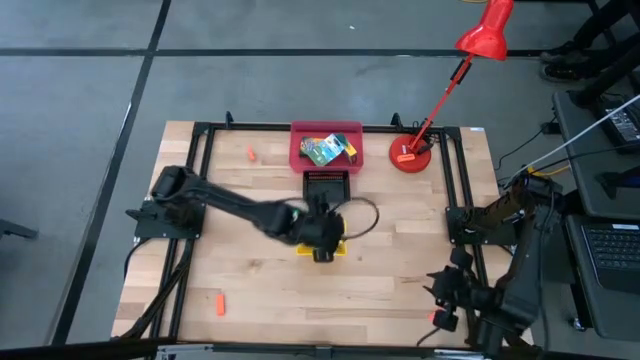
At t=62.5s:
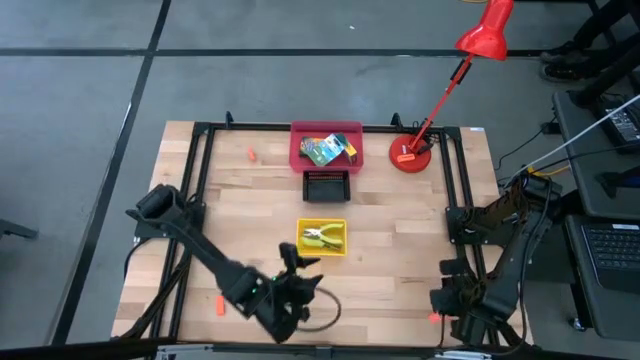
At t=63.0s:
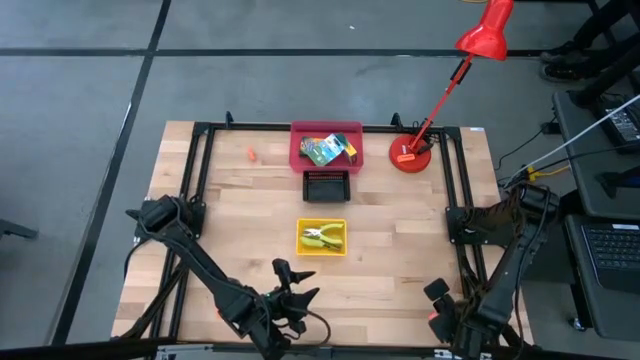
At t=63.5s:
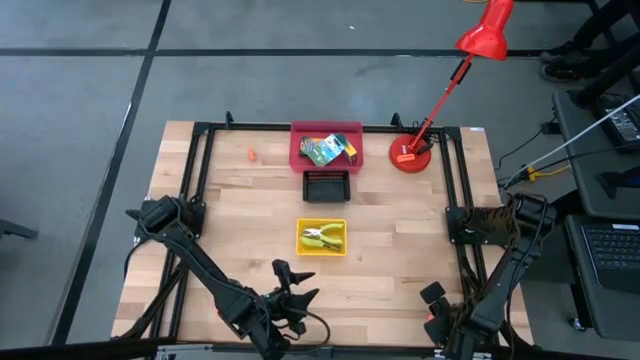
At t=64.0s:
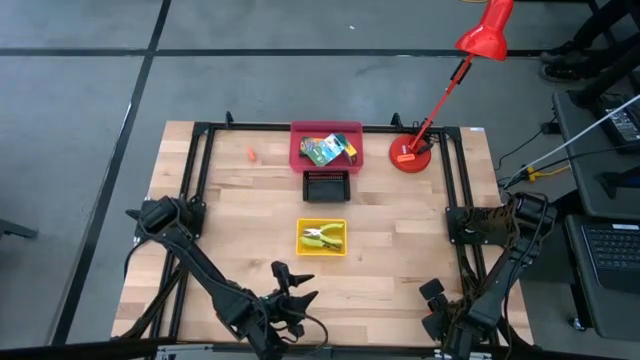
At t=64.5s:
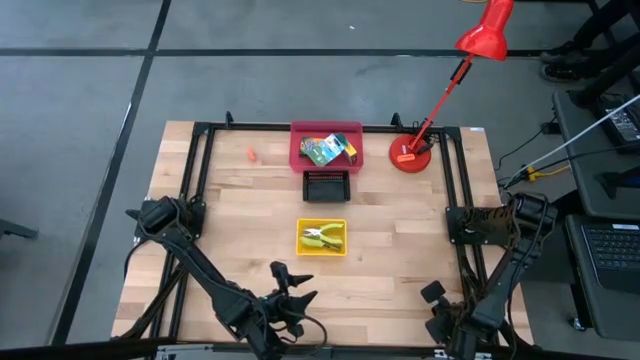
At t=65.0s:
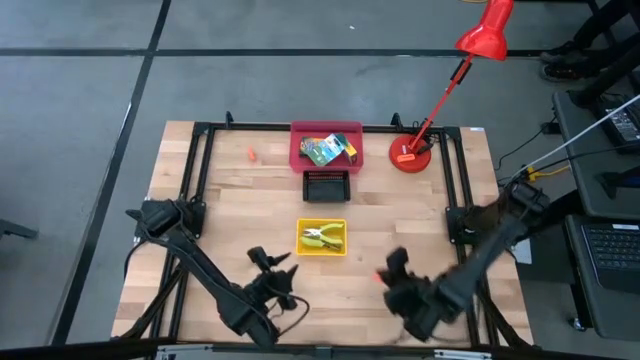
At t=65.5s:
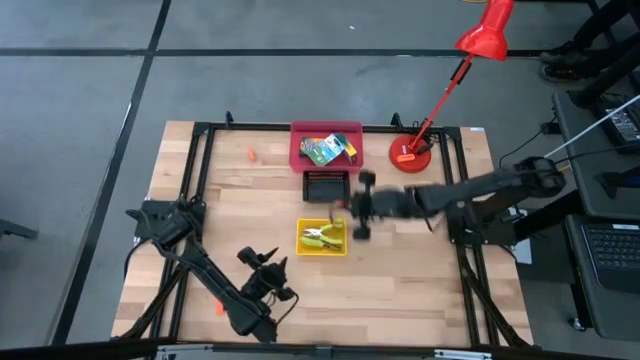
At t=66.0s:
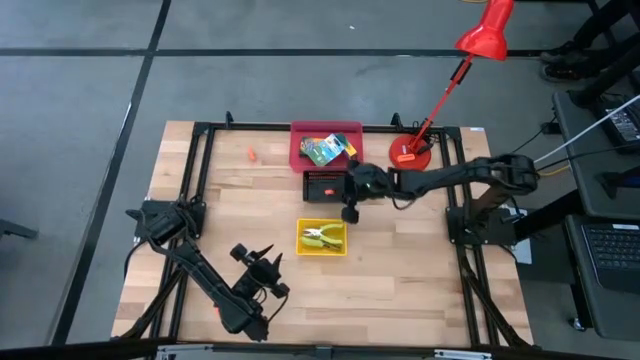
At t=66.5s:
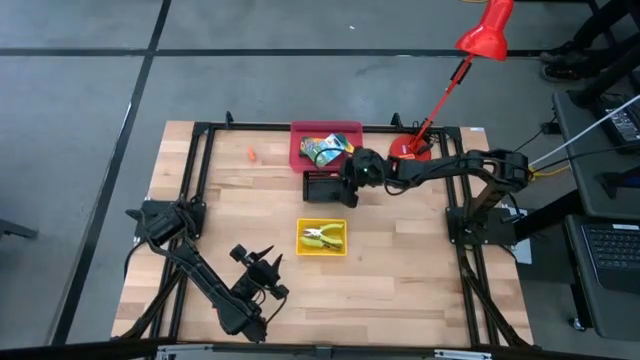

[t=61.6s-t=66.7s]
Task: Pick & Place School Supplies
Put the orange eraser into the black bin

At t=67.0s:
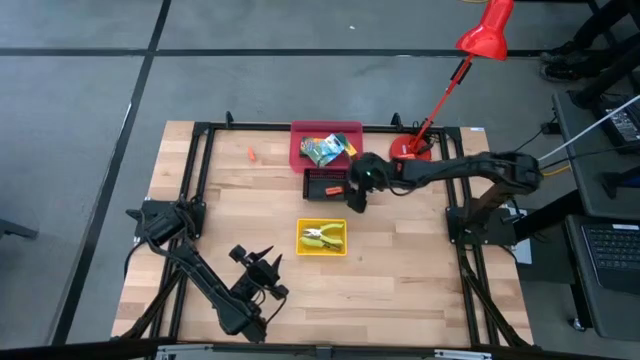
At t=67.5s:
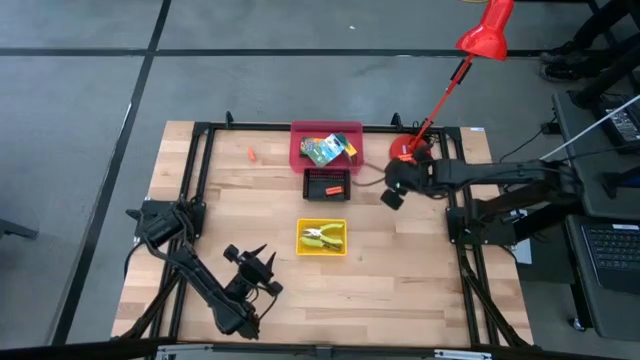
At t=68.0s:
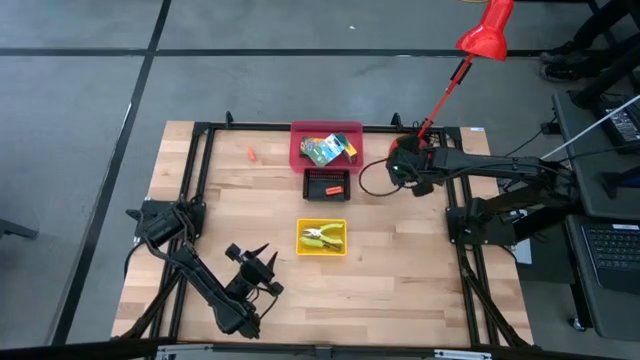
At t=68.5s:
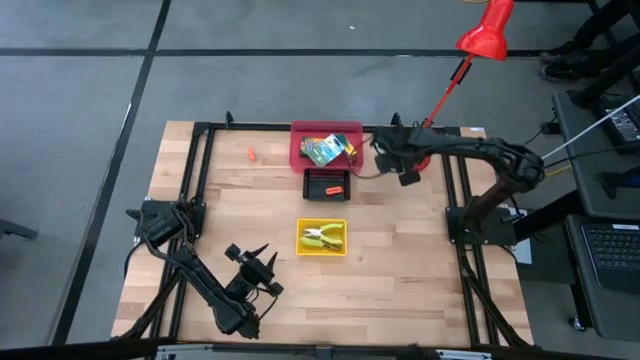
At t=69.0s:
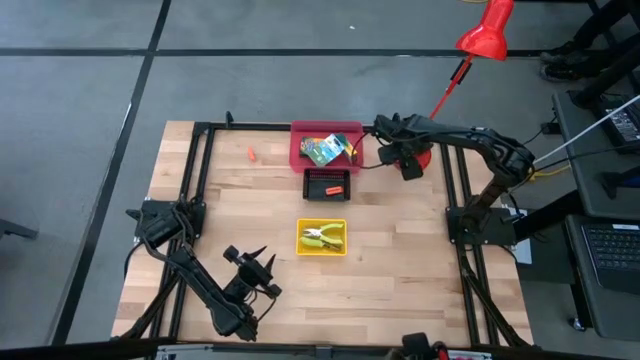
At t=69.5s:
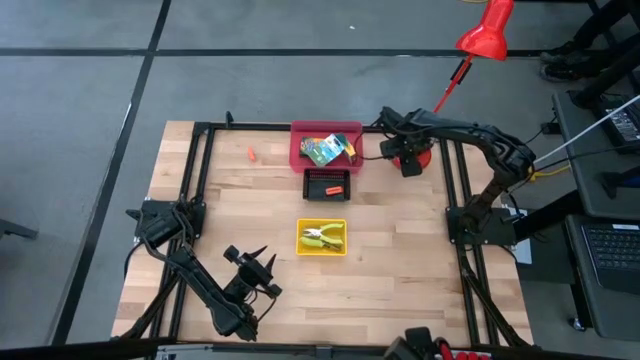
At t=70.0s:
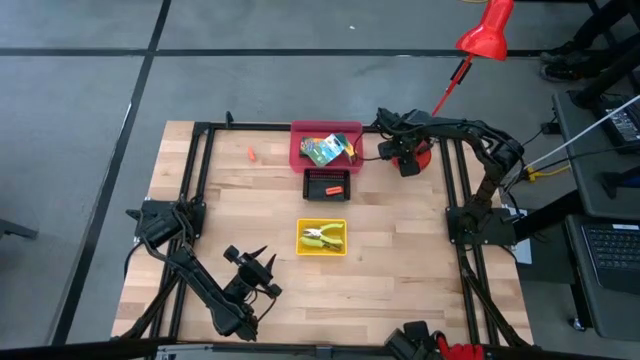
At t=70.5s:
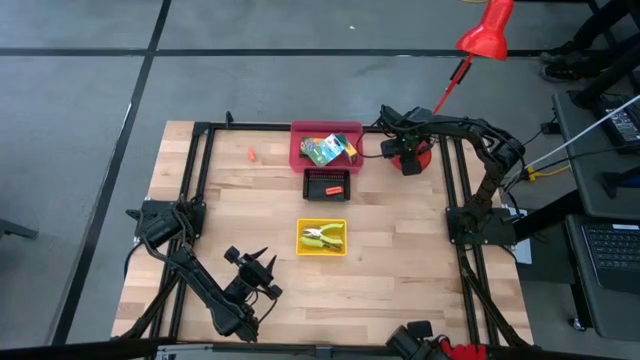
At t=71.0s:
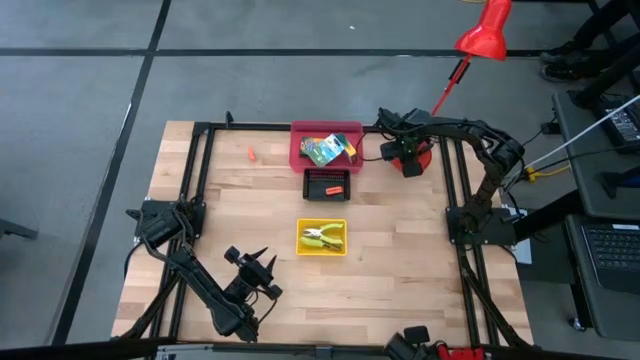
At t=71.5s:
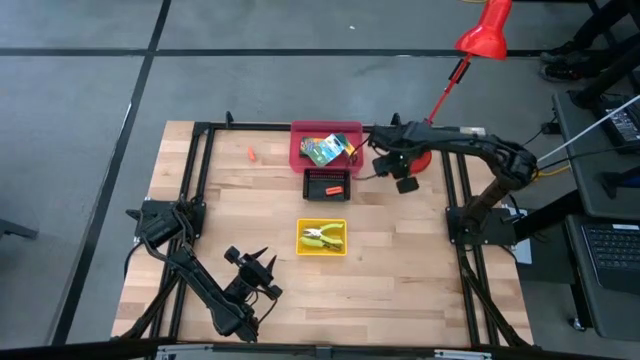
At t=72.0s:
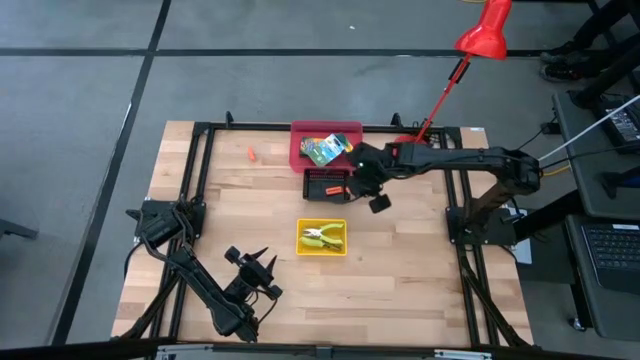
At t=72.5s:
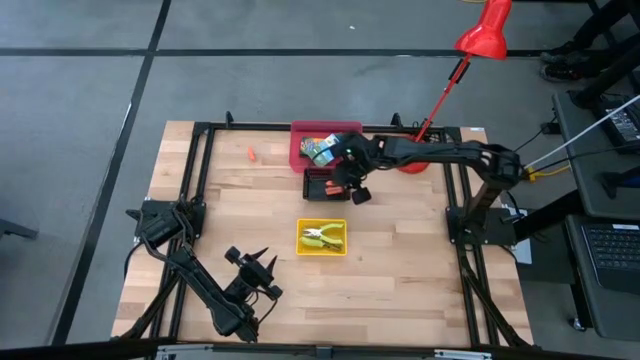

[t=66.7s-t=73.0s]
Put the orange eraser into the black bin

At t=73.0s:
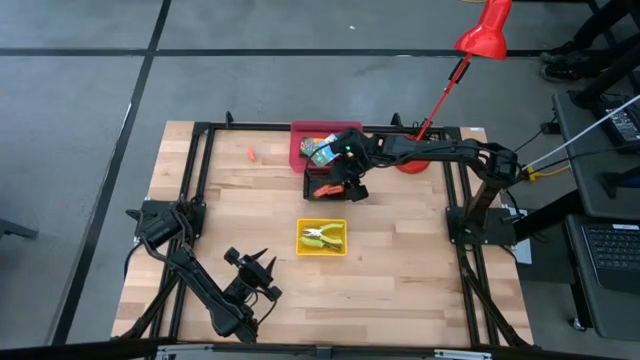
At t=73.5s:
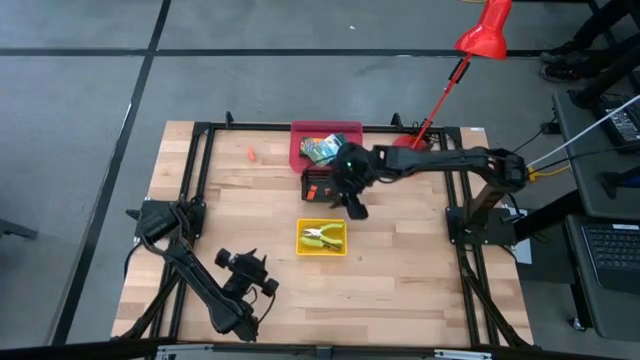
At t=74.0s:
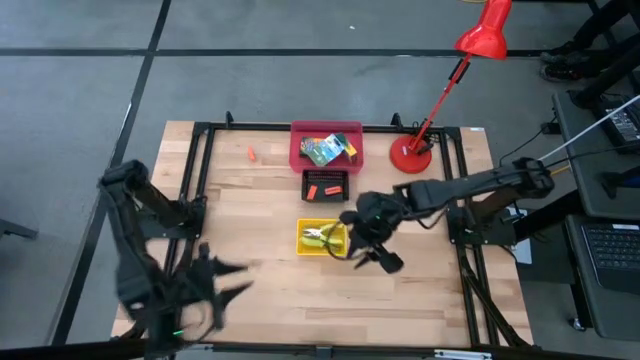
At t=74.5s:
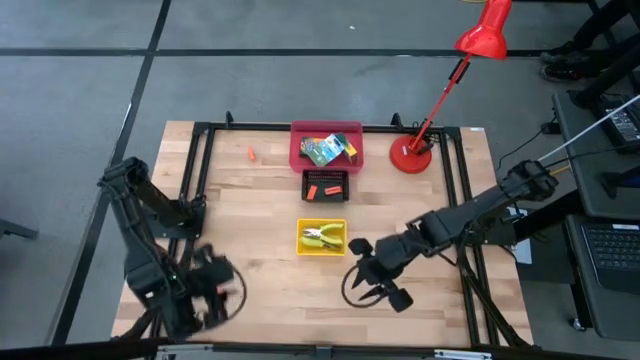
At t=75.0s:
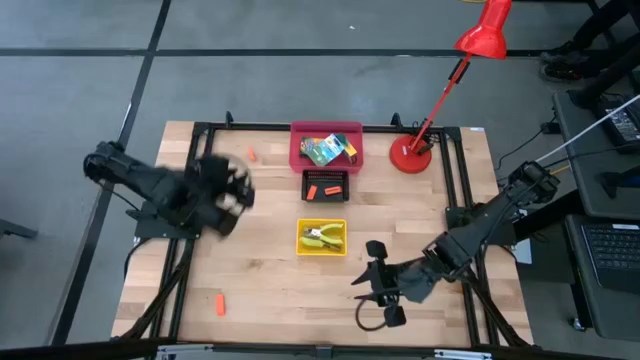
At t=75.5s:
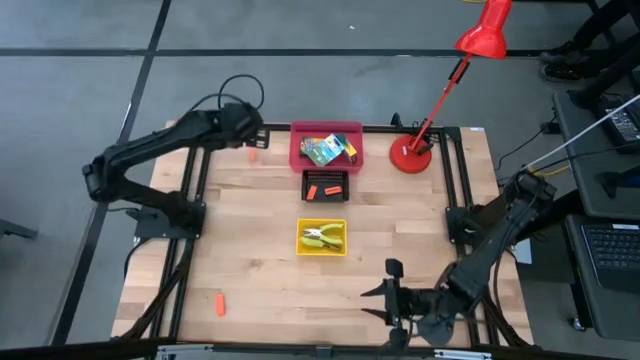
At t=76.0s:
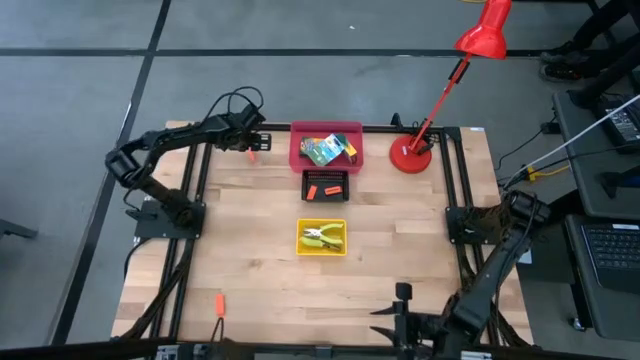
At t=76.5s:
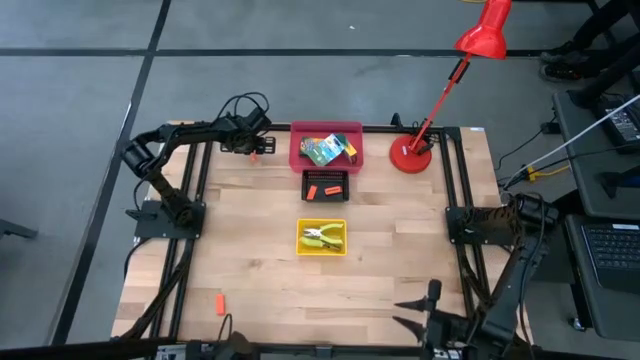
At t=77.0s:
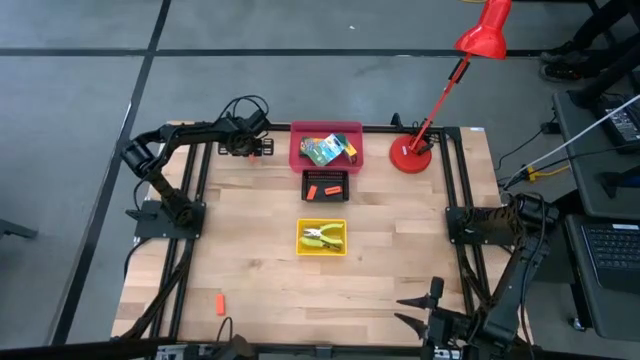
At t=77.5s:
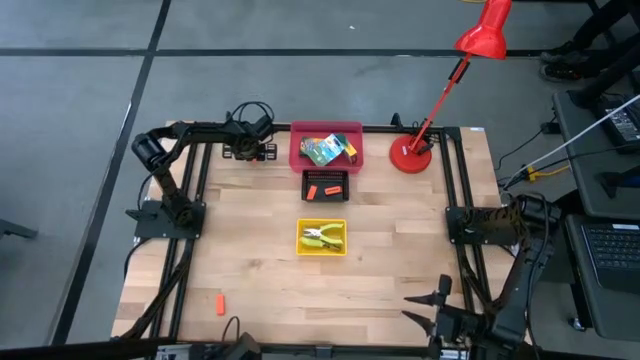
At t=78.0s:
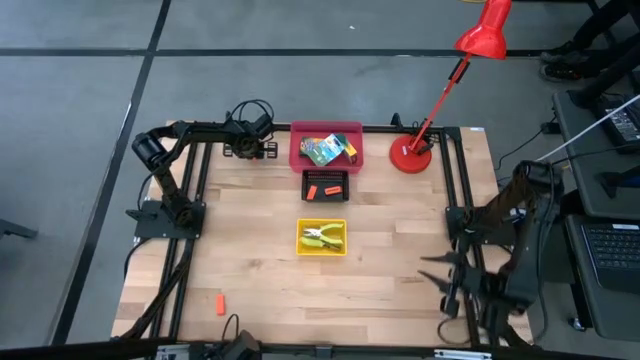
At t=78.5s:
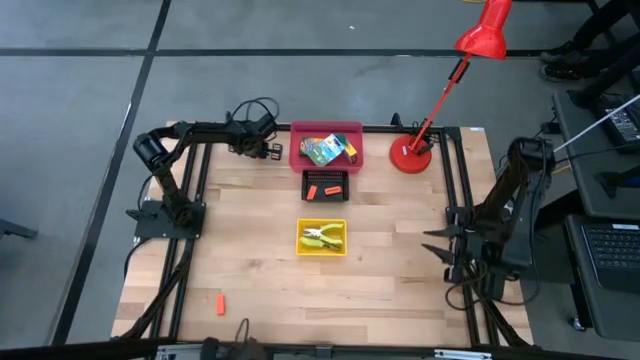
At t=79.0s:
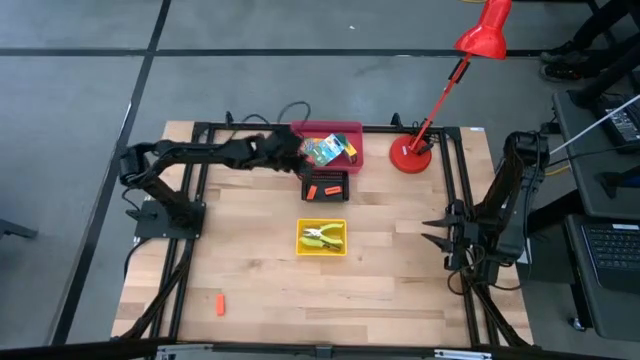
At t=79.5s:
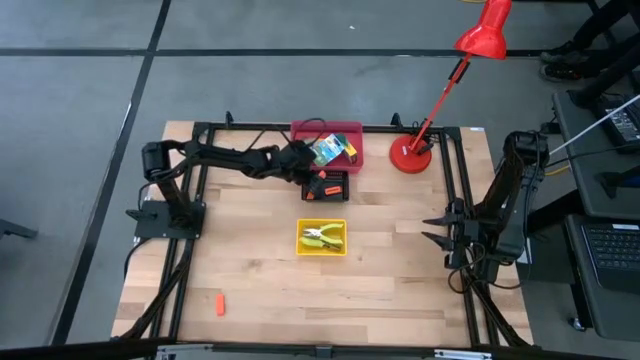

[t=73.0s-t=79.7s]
Put the orange eraser into the black bin

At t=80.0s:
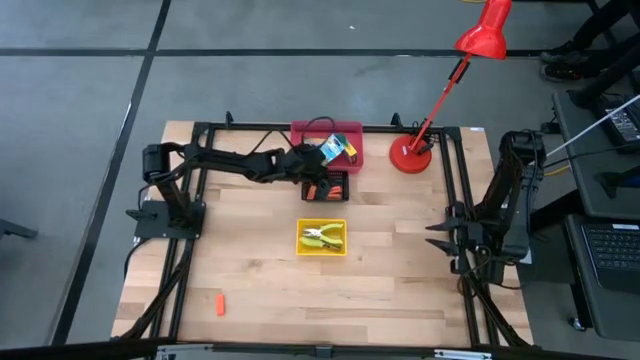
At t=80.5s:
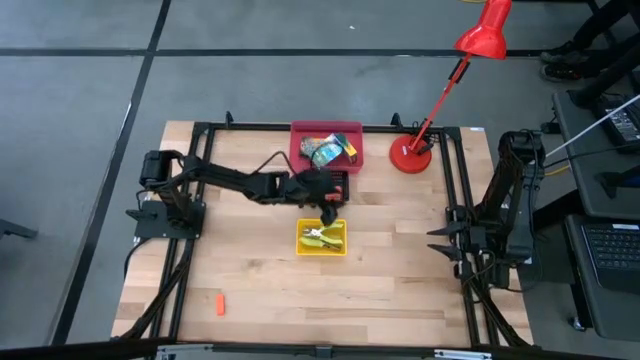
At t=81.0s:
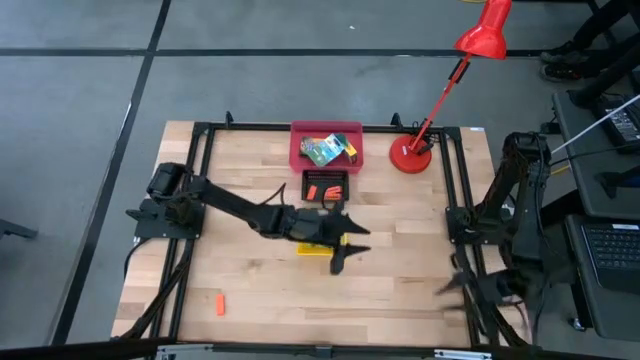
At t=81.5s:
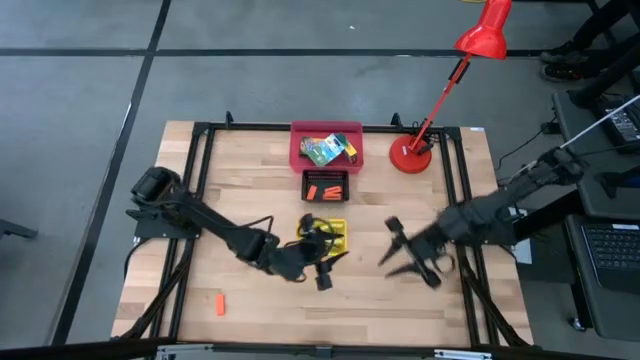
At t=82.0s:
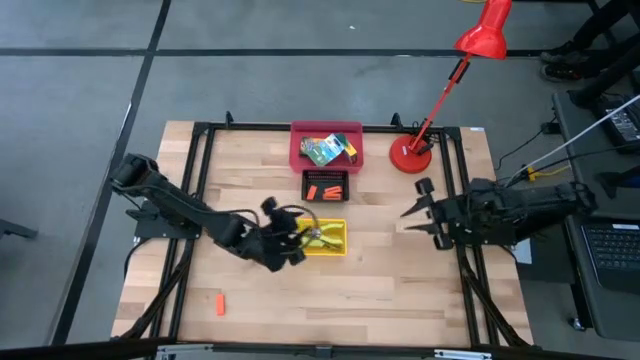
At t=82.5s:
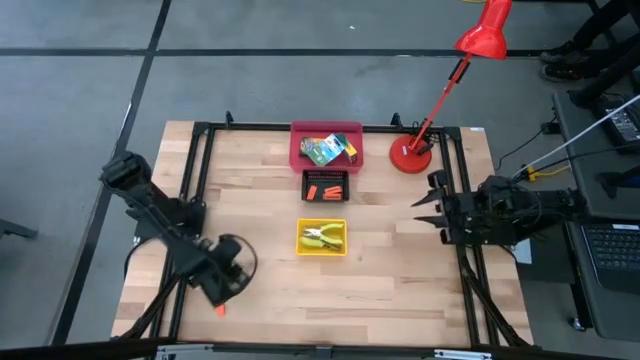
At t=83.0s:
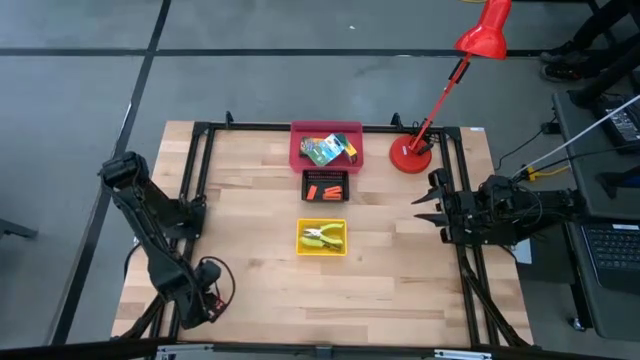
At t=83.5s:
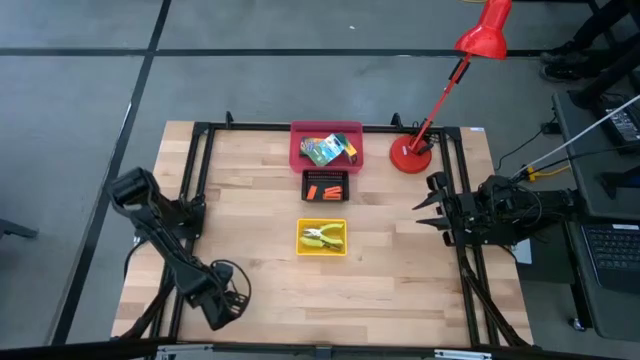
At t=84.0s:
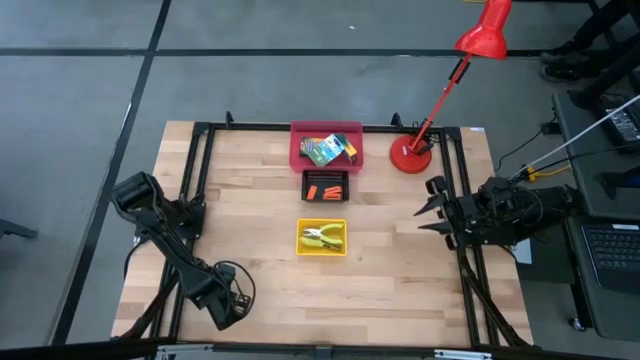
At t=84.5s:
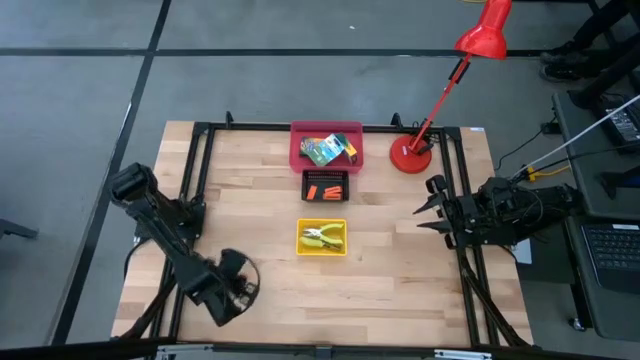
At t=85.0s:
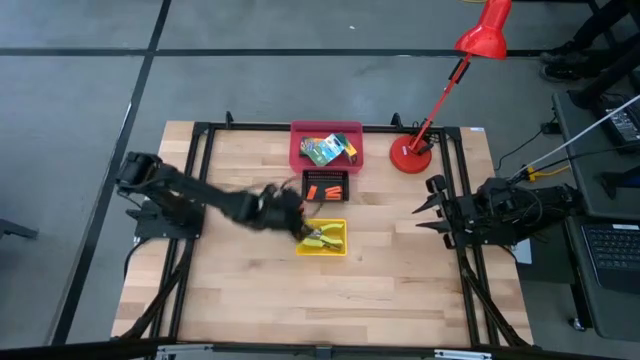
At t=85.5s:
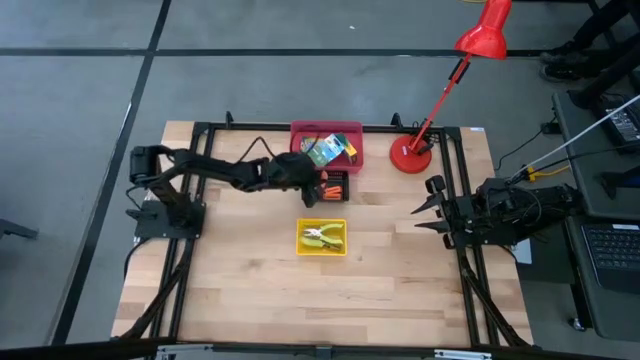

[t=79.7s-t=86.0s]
Put the orange eraser into the black bin
